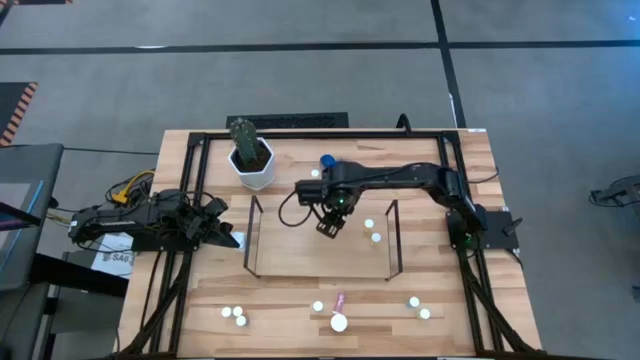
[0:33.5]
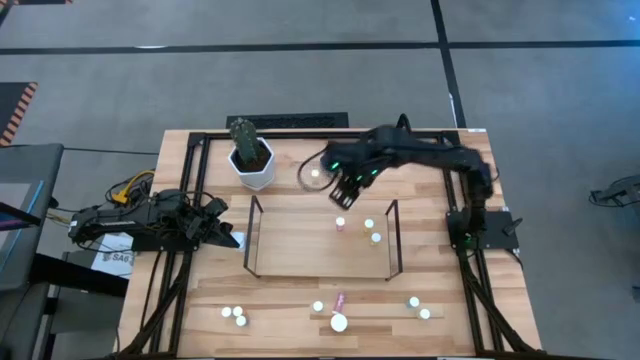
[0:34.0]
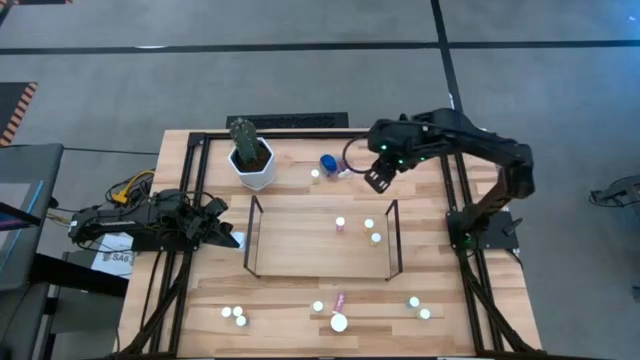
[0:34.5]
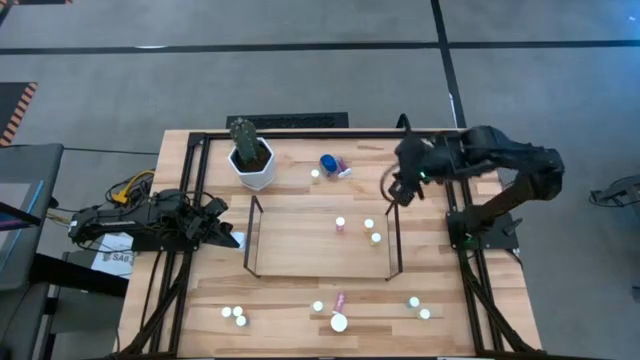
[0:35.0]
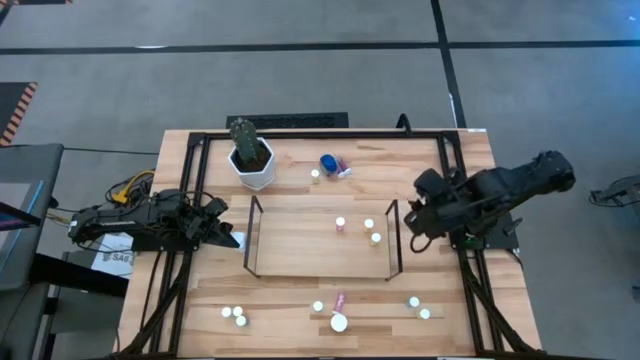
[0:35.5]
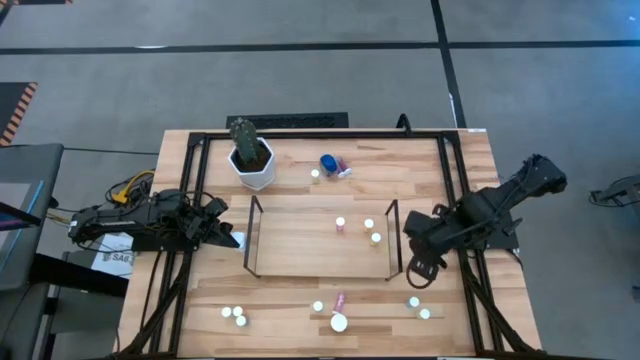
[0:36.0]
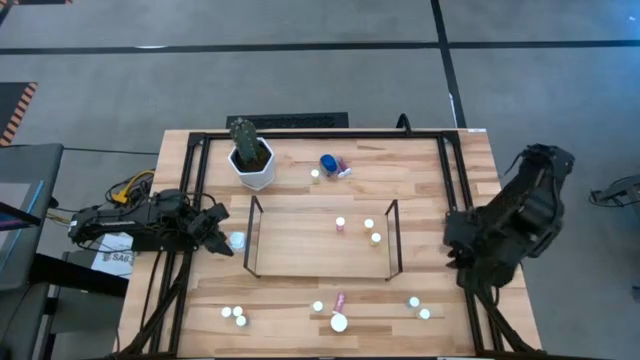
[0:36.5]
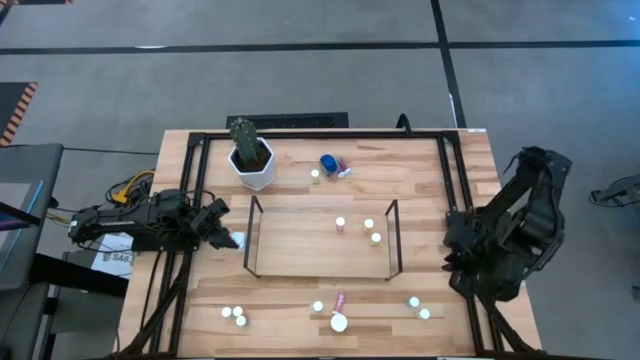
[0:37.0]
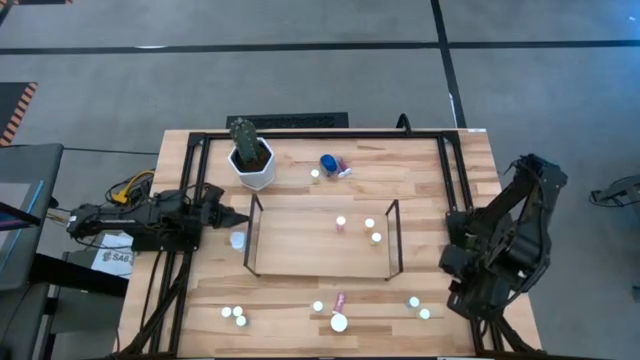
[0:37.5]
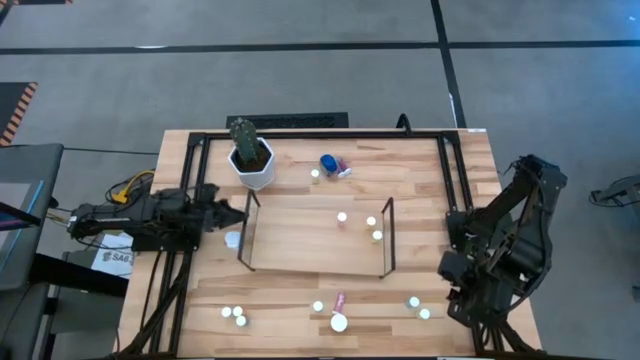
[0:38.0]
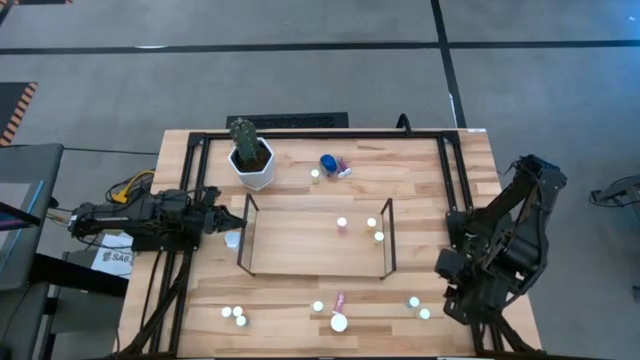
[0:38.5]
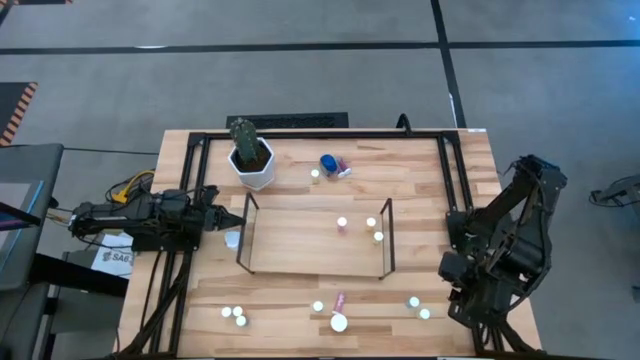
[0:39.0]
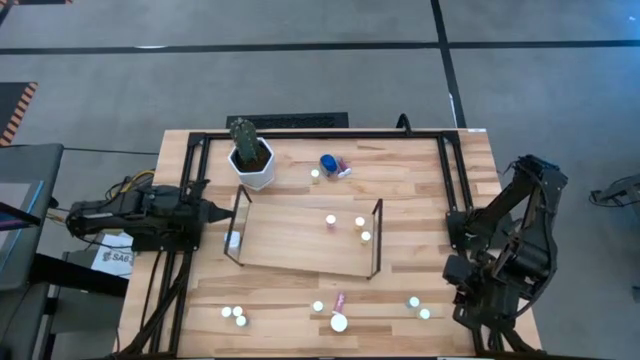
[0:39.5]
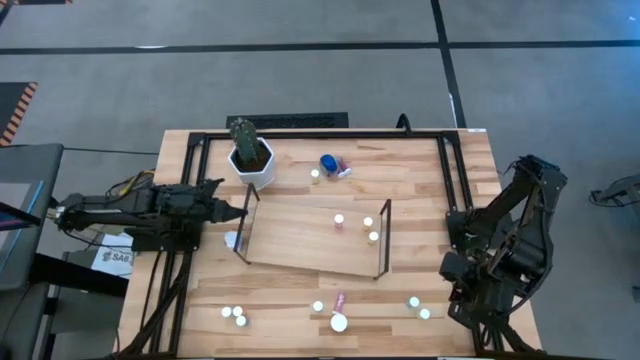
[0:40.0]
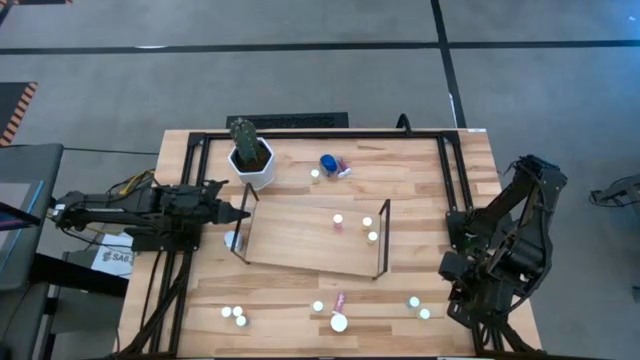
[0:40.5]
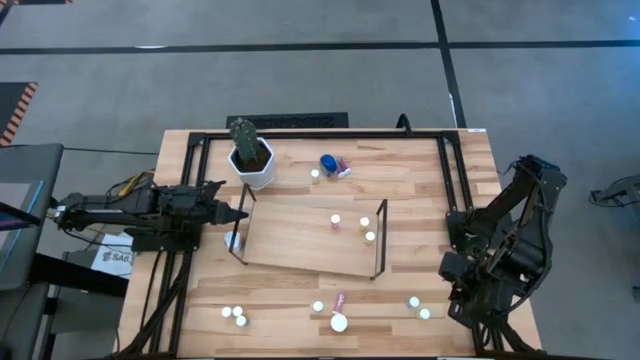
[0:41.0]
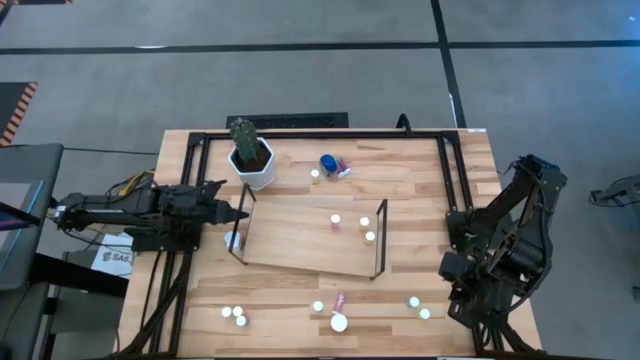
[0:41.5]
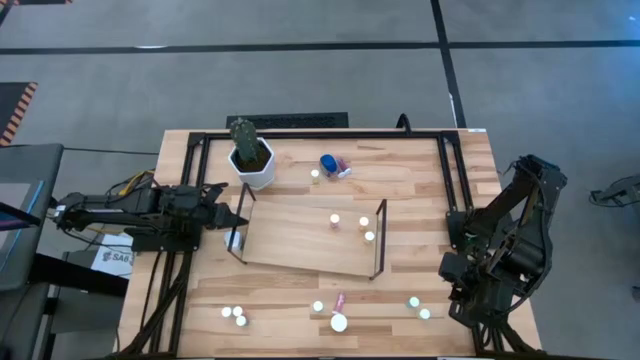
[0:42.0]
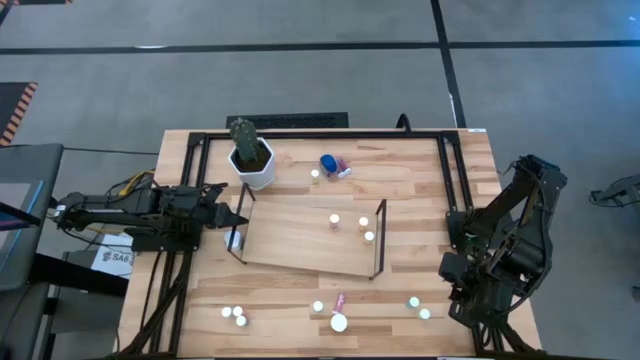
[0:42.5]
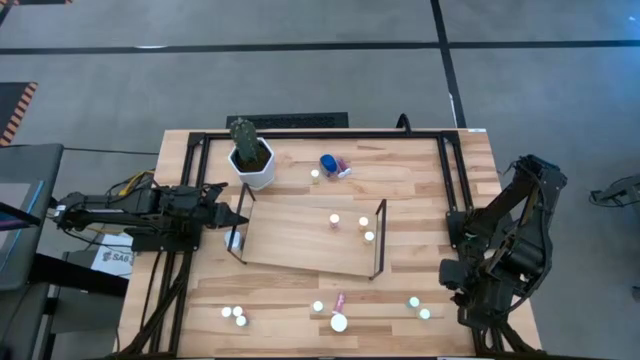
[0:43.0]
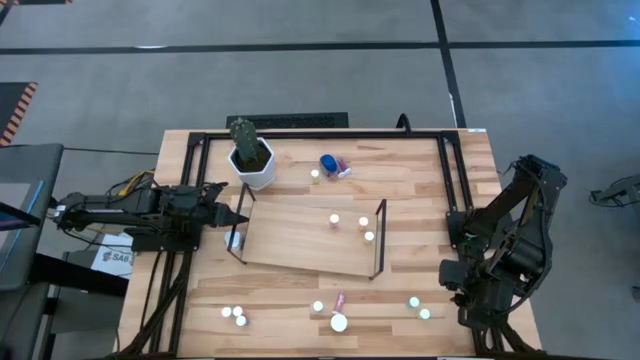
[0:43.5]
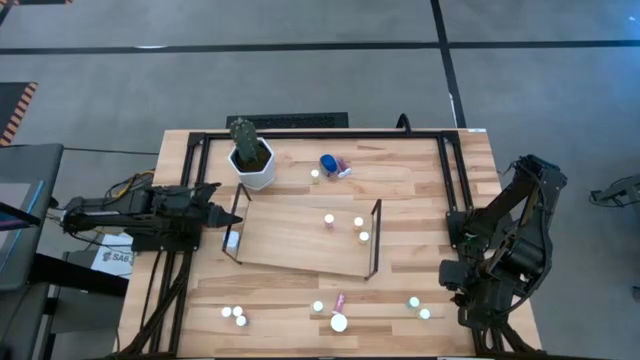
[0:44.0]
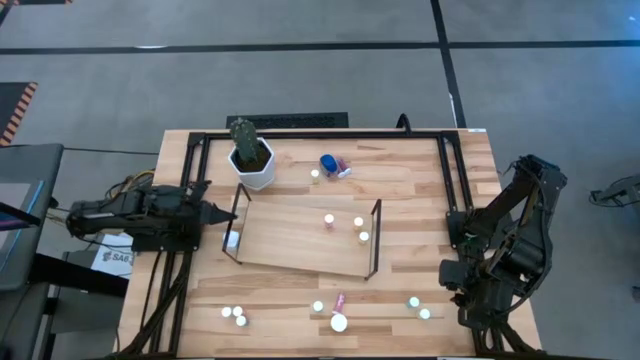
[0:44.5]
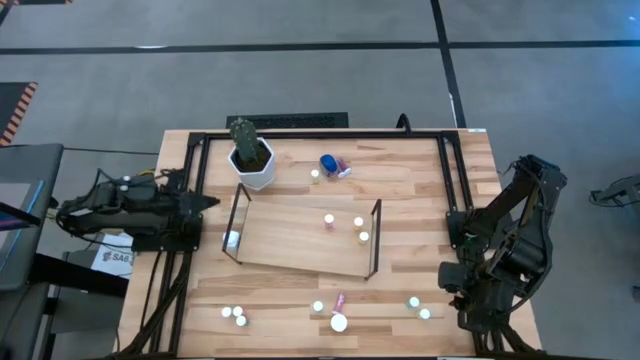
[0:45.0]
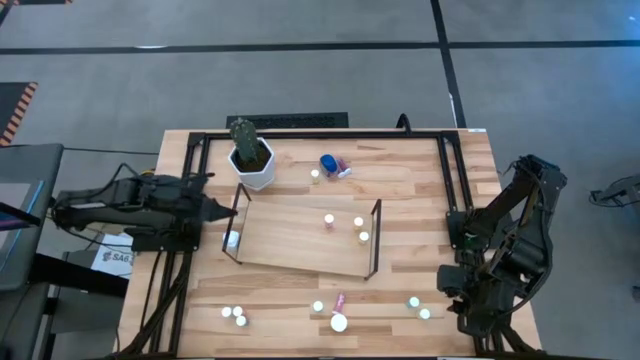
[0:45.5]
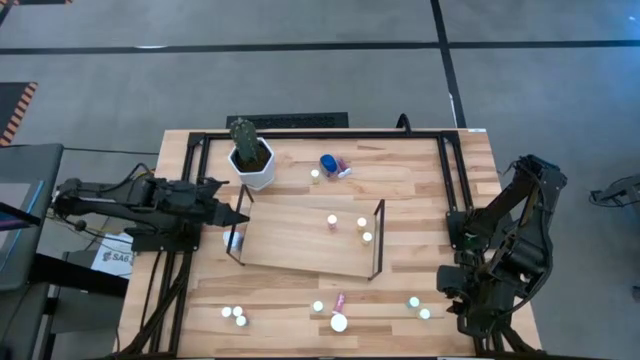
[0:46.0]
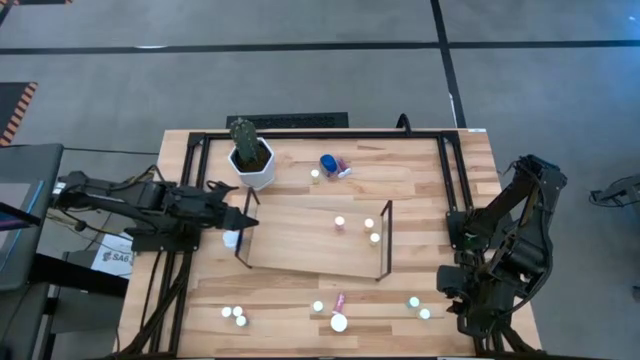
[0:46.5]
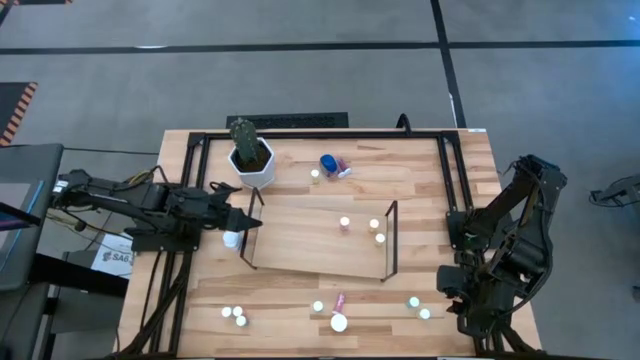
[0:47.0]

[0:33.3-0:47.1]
Task: Pick and place medicine bottles onto shelf by color
Adjust the shelf

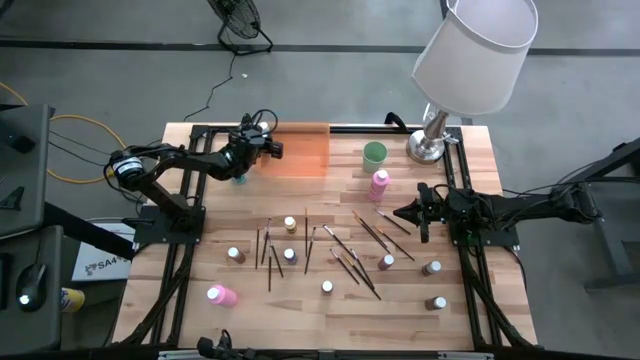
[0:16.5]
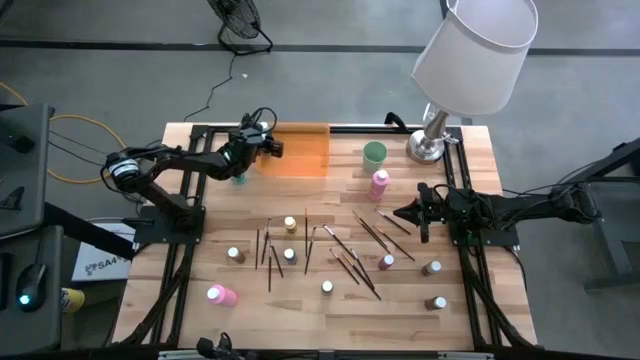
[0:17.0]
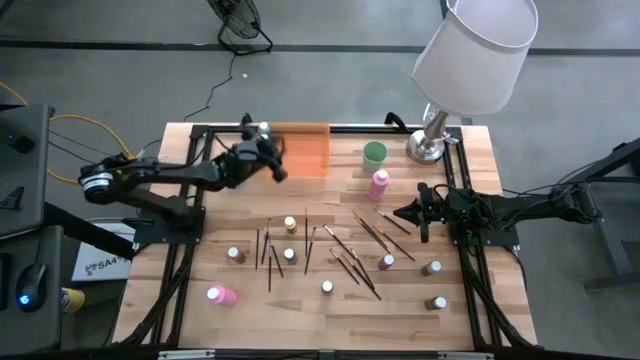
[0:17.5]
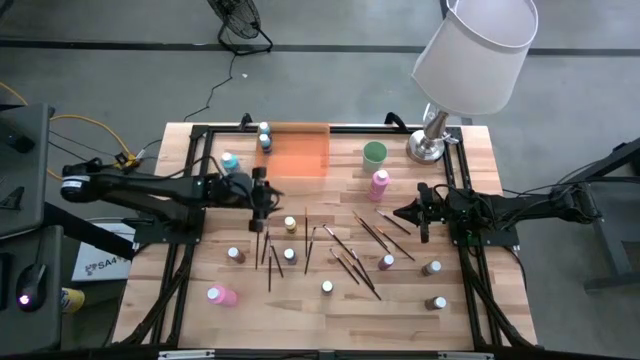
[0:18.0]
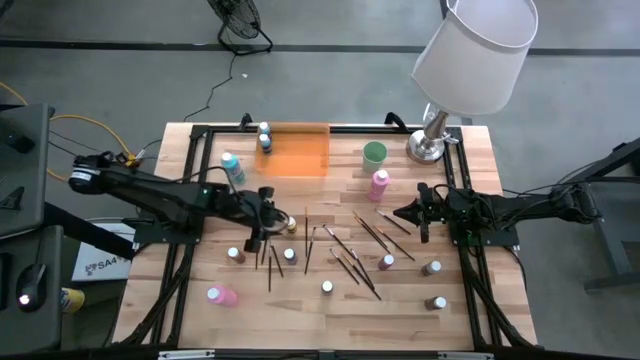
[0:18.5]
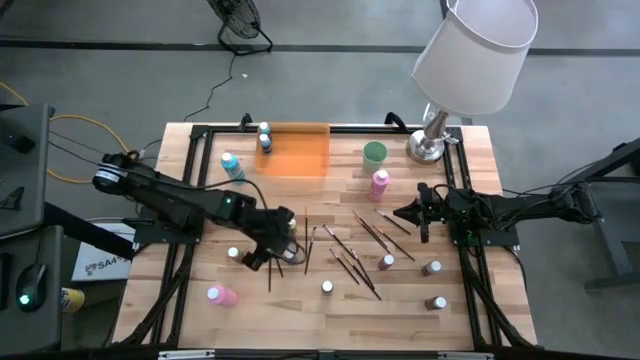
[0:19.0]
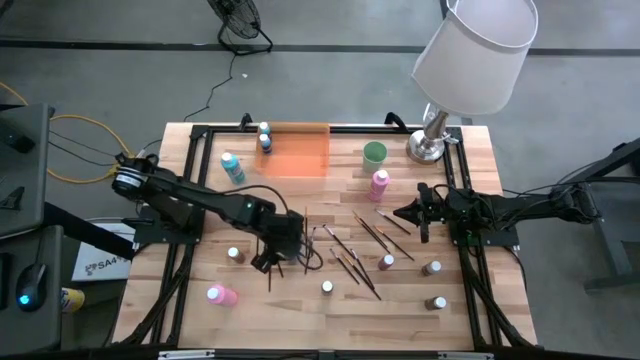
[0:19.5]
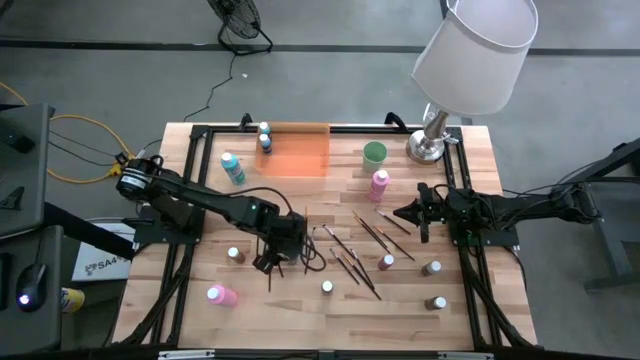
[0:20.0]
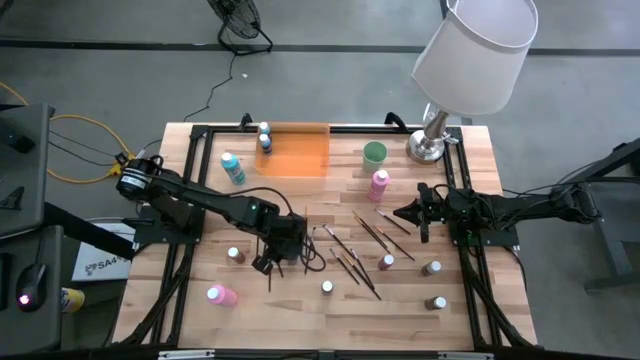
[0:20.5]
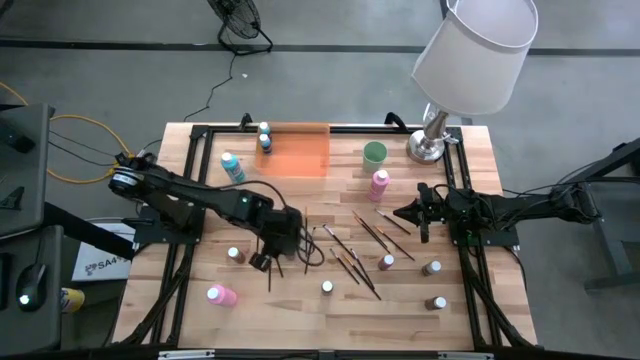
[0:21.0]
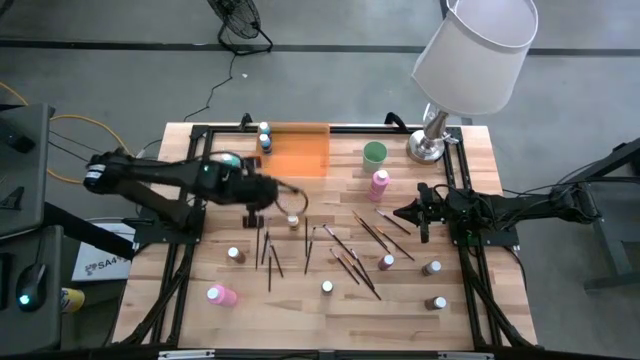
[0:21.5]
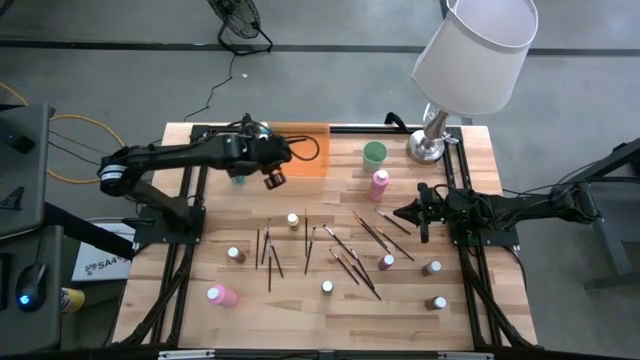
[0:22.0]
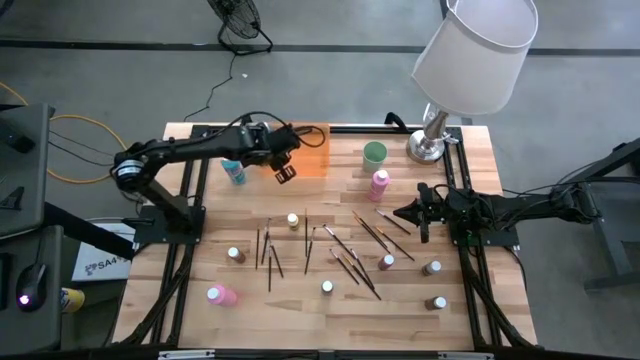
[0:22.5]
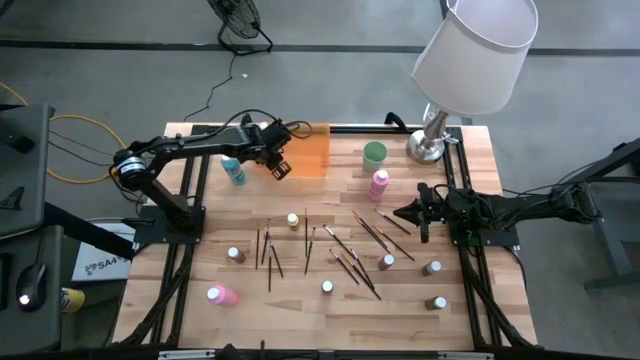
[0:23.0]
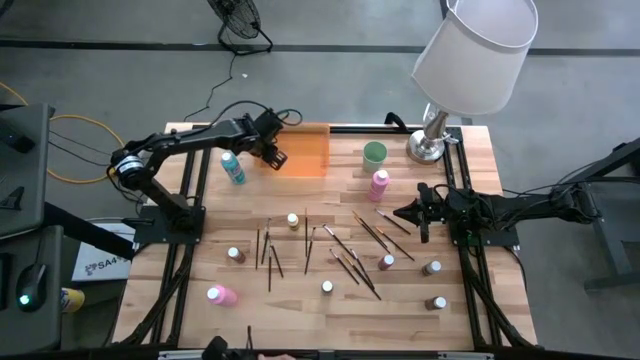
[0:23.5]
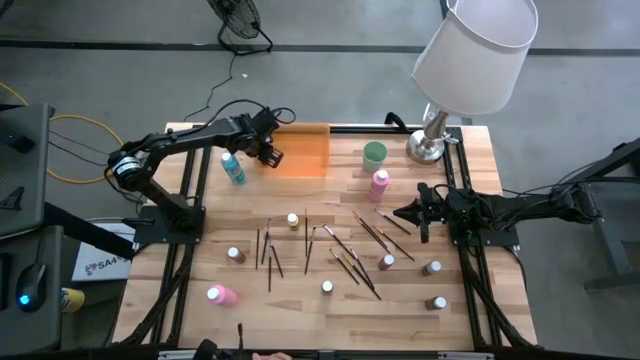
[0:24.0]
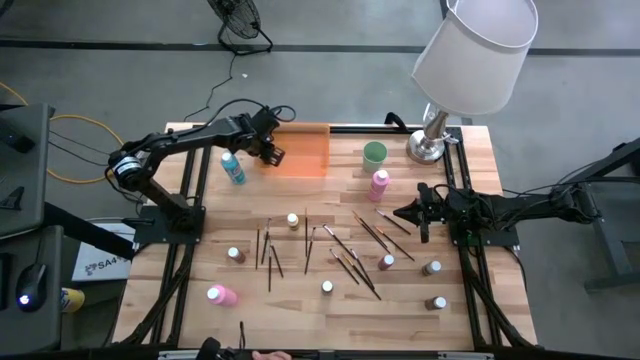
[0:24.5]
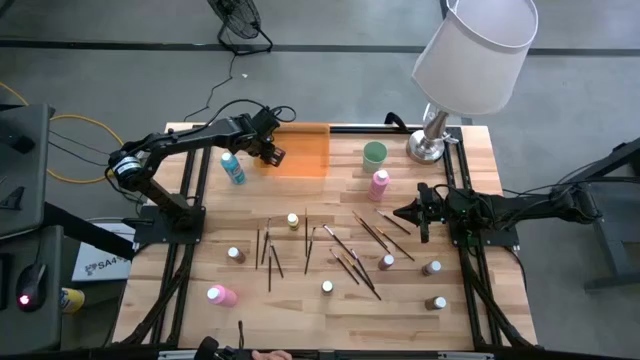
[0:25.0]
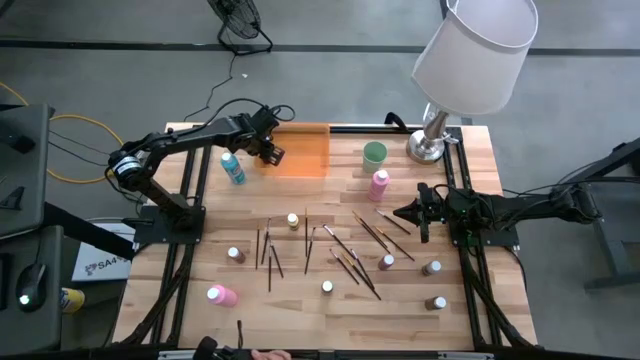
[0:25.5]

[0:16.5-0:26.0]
Task: Pick & Place Paint Supplies
Put the dark blue paint bottle into the orange bin
